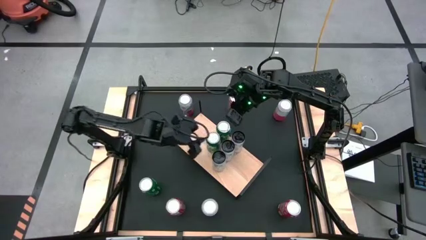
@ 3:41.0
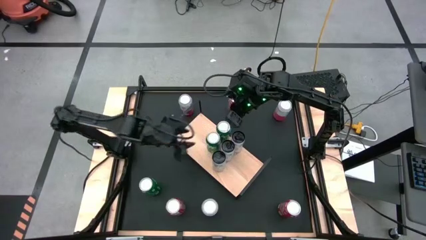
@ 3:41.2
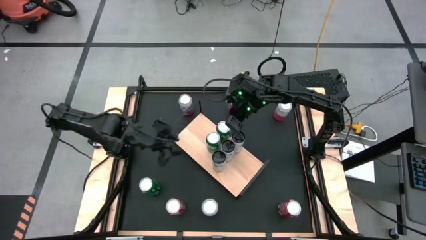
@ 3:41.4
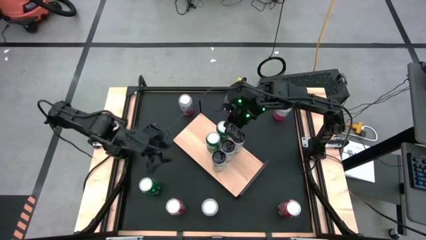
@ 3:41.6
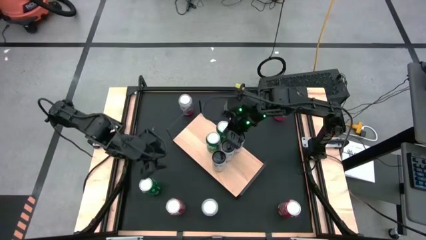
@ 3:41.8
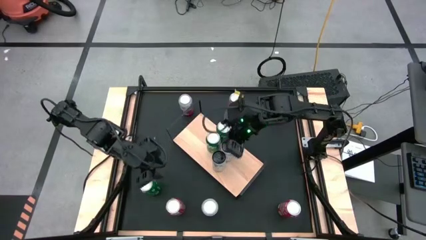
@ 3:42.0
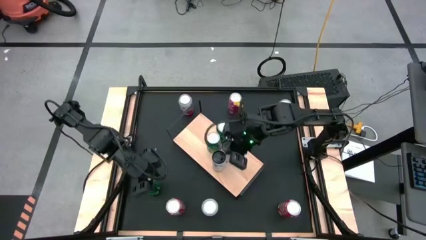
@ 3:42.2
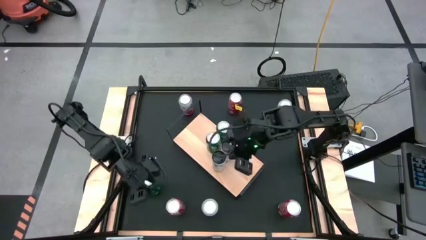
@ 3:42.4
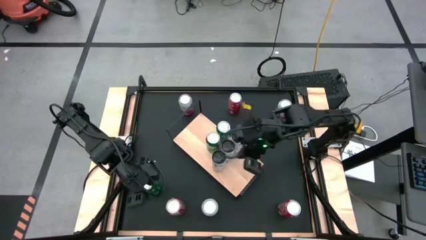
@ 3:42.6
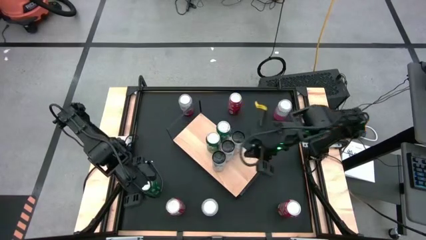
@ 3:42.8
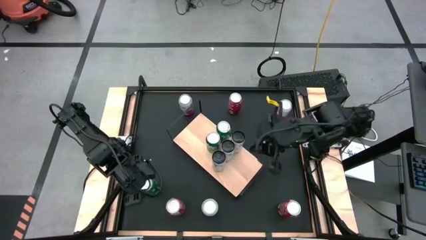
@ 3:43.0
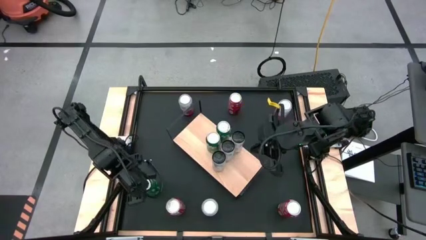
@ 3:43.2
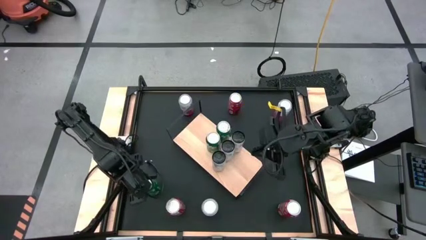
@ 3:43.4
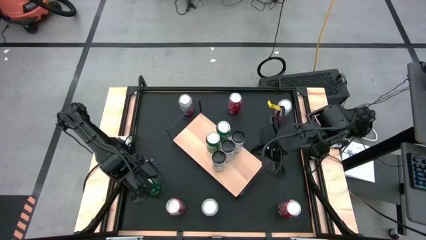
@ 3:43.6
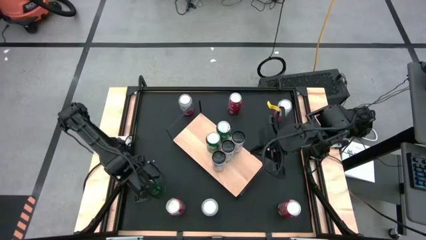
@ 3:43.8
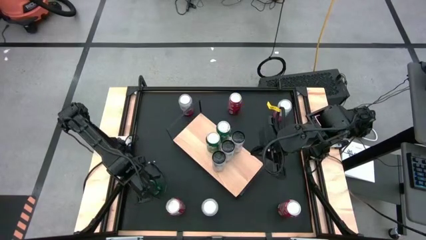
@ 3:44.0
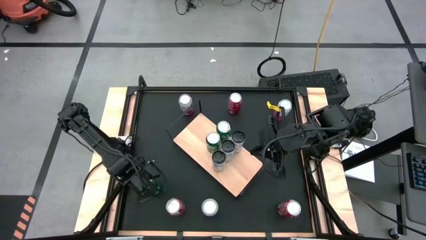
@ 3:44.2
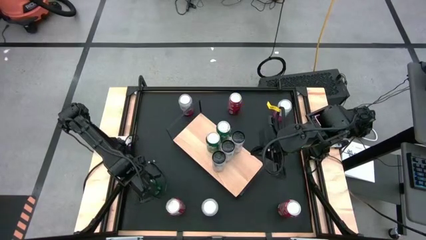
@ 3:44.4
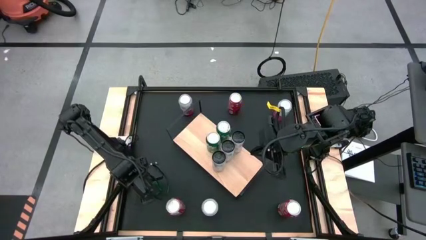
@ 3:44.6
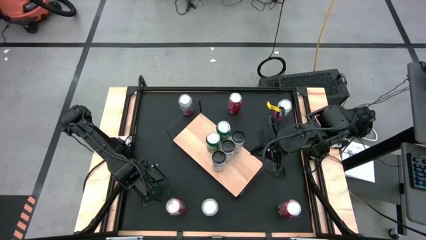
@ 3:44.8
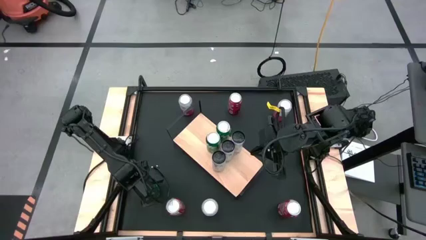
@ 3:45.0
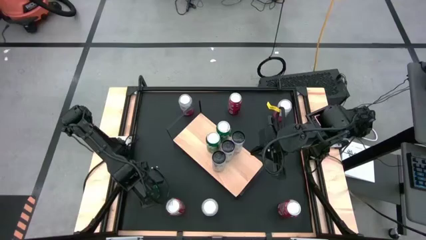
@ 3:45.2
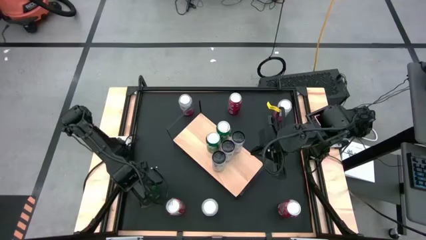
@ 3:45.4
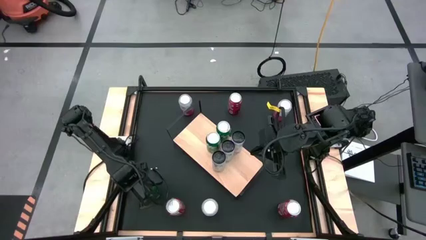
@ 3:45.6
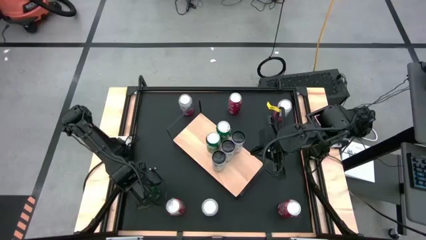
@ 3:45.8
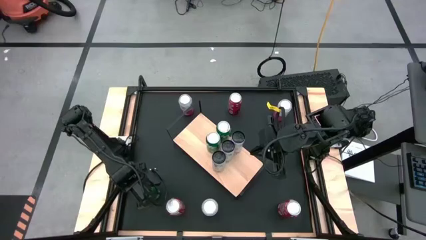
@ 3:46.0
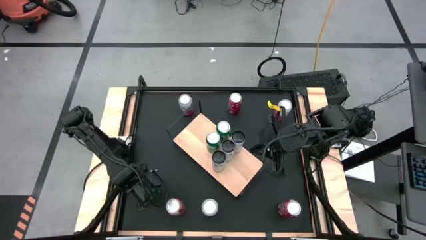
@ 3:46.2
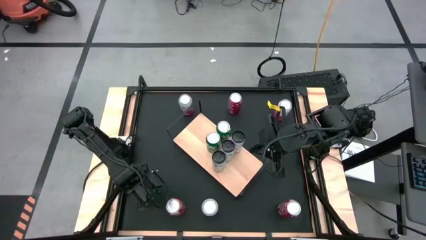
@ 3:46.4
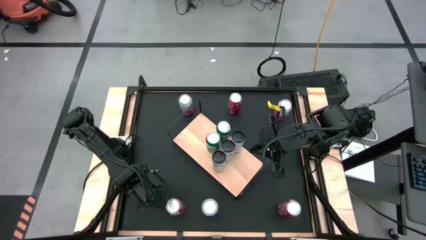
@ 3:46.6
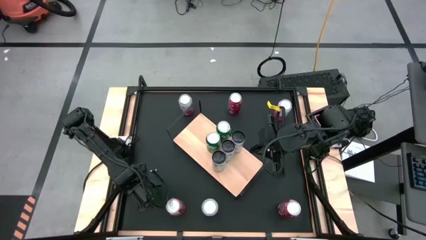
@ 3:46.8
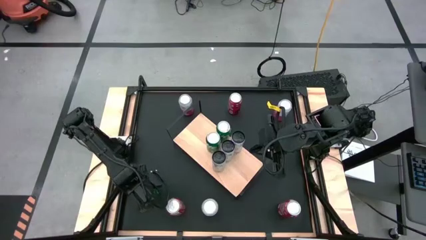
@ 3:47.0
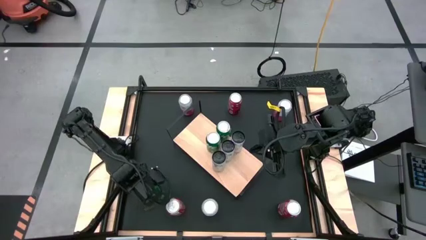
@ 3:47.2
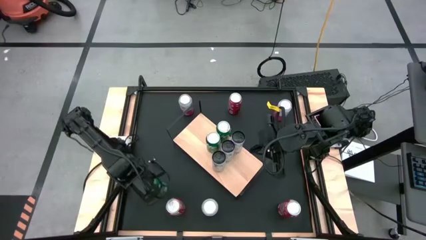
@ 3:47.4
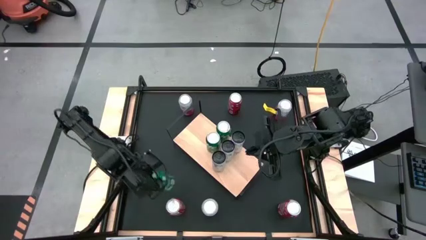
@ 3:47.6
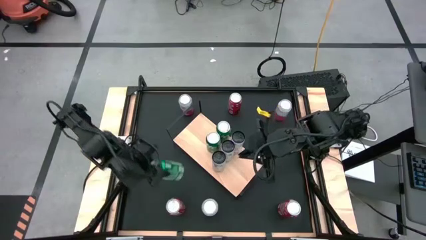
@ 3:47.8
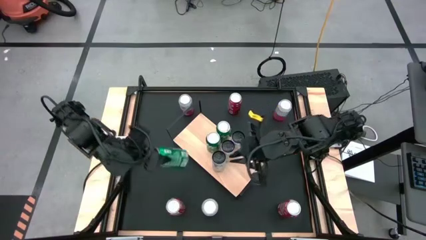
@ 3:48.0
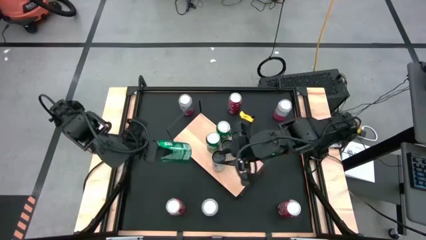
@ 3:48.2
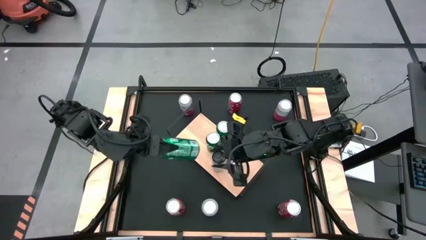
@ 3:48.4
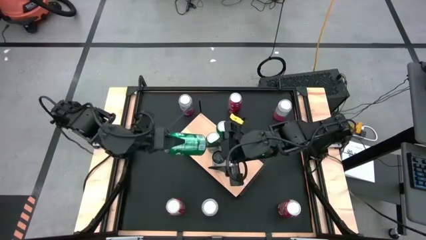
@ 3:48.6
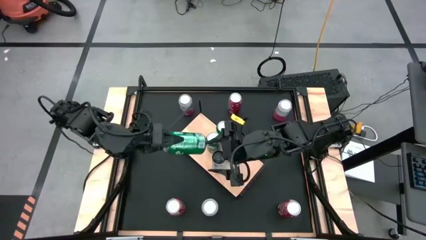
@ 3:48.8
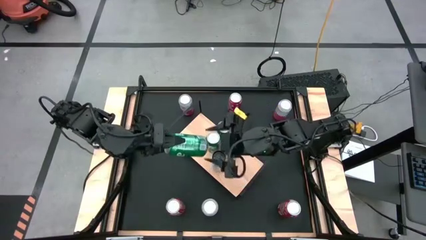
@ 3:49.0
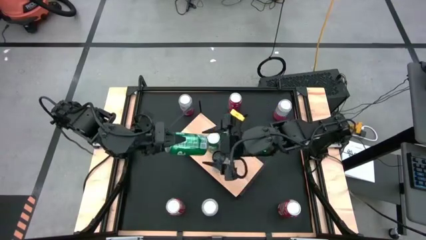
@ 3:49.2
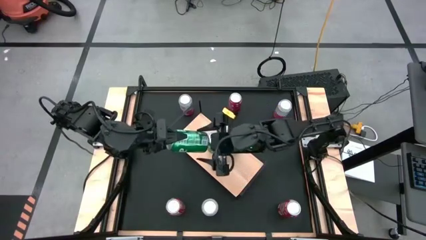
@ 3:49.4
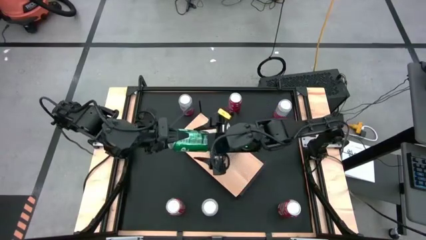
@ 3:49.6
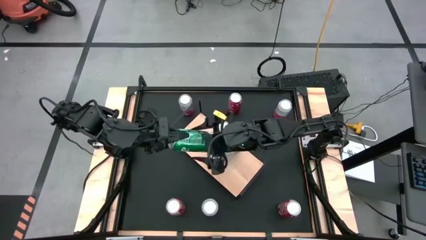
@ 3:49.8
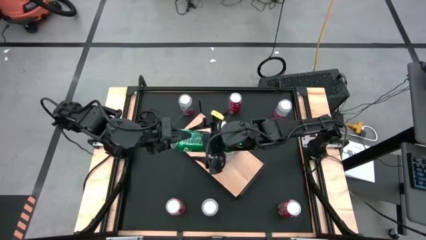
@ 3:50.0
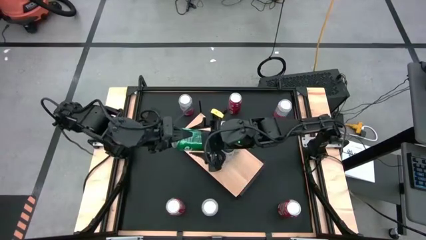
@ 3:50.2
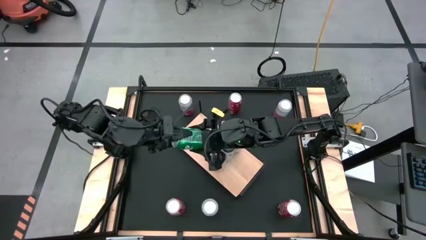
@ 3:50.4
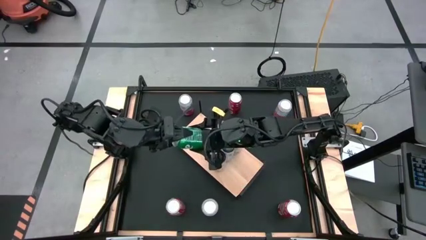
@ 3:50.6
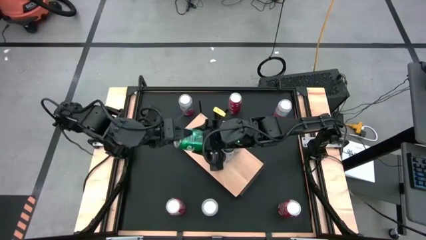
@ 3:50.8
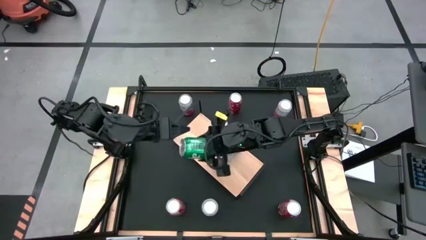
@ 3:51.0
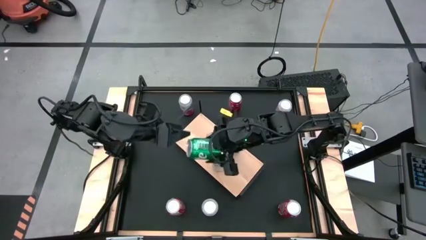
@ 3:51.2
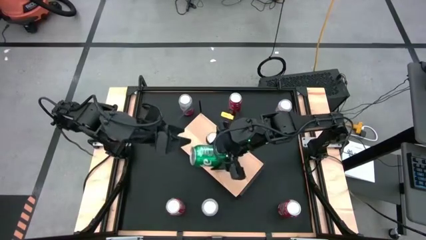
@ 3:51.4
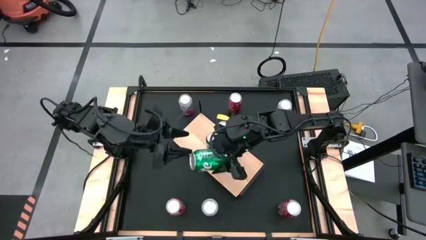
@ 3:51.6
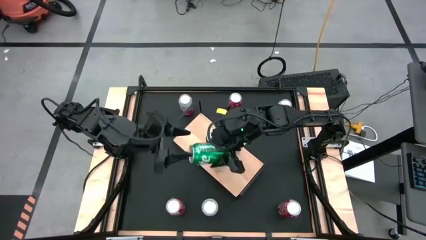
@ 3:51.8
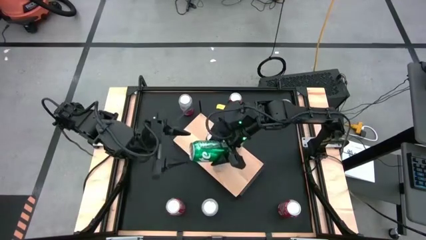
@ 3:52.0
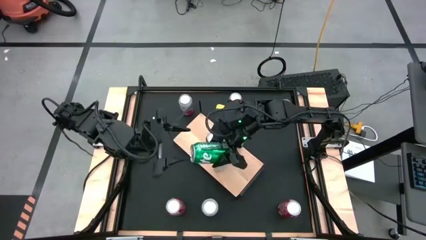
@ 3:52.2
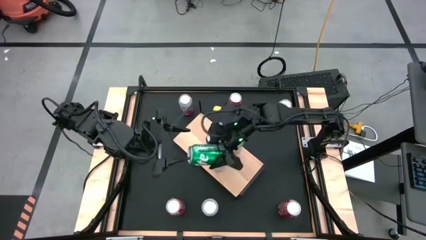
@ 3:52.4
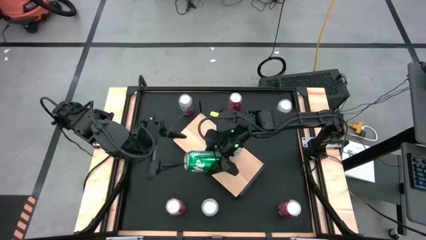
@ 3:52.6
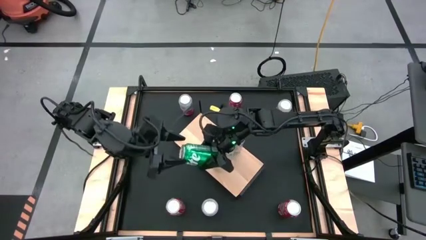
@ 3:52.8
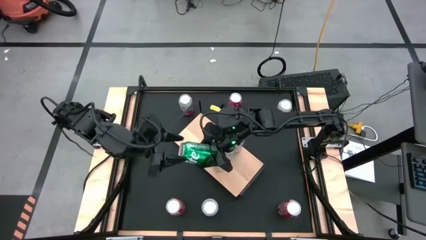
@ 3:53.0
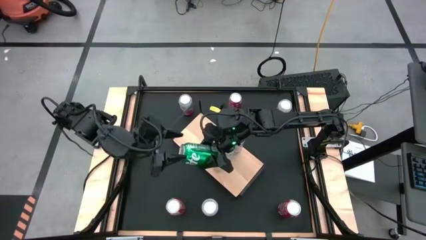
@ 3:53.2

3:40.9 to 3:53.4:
Task: Place canned beverage on shelf
Put the green soda can aligned with the other green soda cans

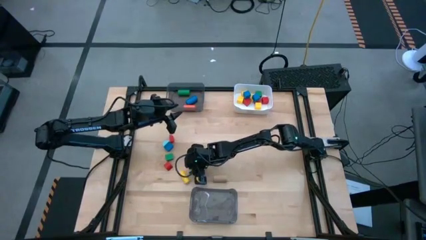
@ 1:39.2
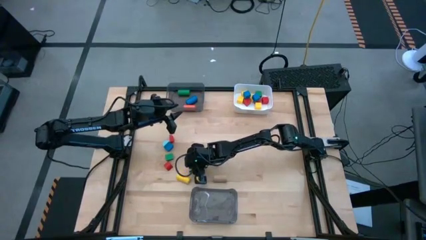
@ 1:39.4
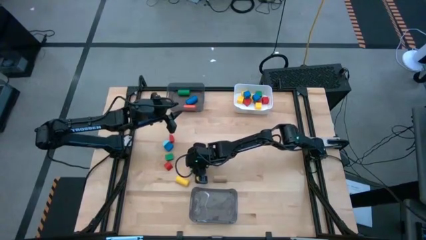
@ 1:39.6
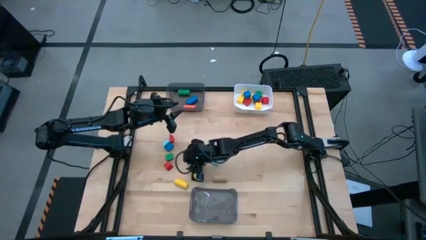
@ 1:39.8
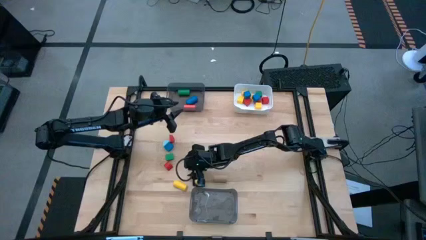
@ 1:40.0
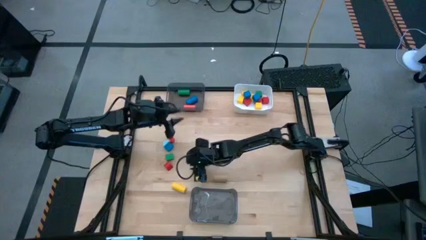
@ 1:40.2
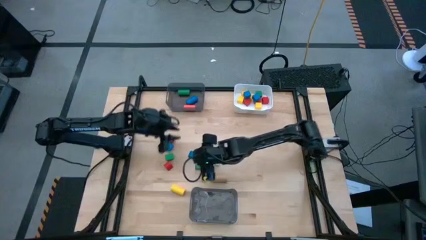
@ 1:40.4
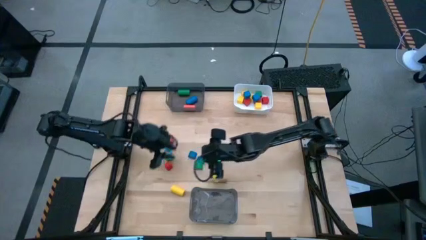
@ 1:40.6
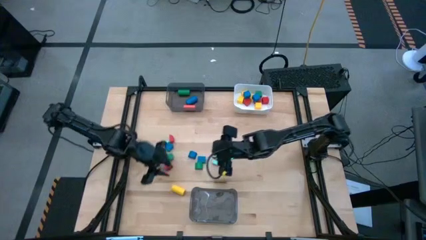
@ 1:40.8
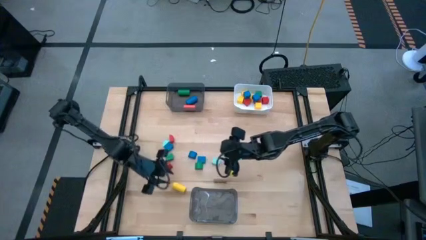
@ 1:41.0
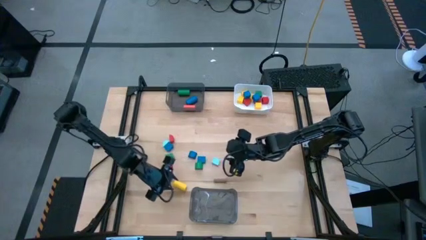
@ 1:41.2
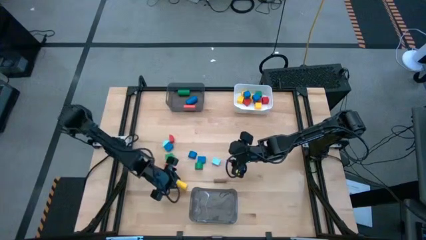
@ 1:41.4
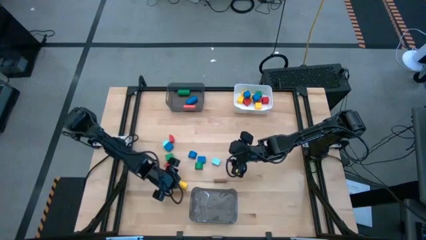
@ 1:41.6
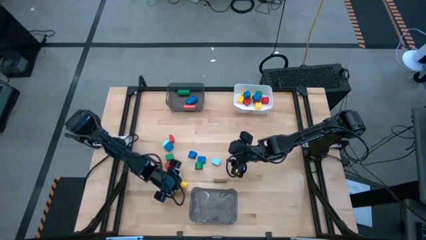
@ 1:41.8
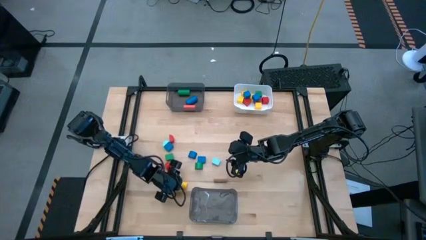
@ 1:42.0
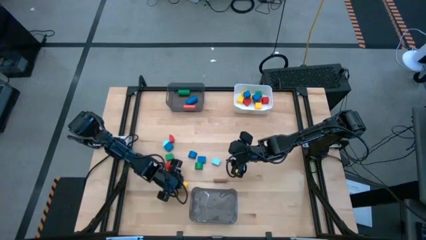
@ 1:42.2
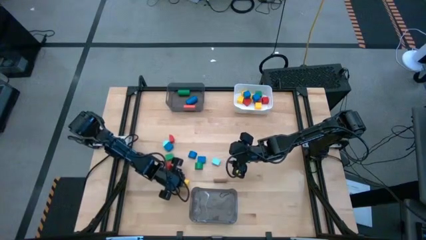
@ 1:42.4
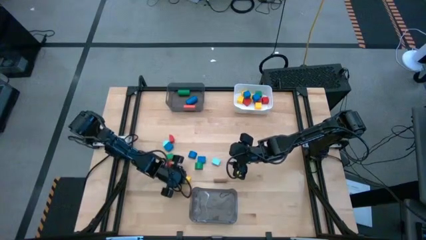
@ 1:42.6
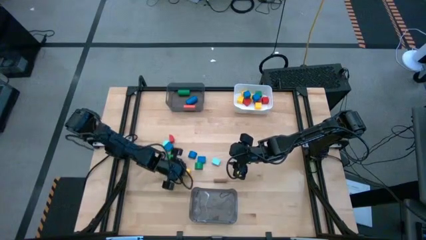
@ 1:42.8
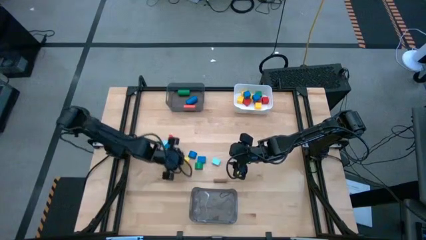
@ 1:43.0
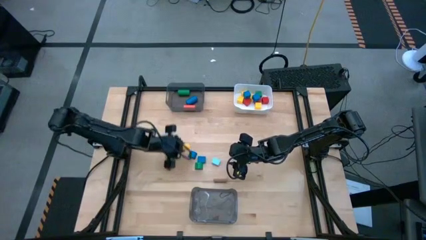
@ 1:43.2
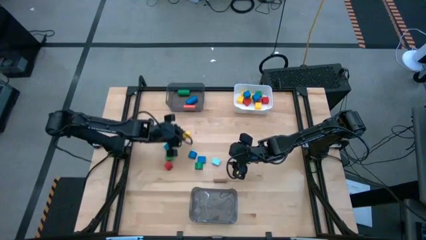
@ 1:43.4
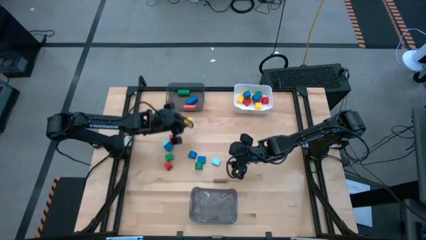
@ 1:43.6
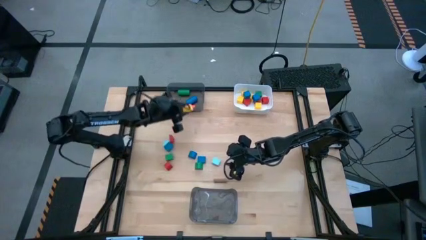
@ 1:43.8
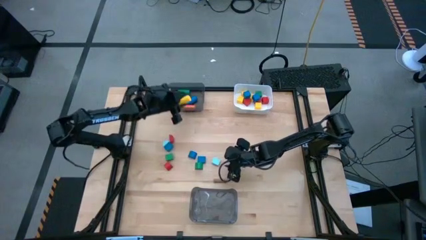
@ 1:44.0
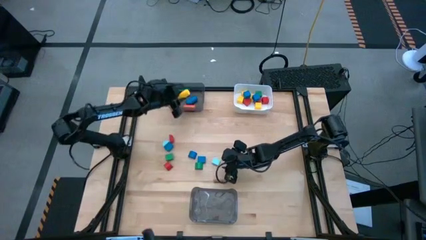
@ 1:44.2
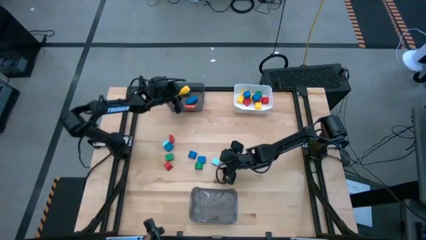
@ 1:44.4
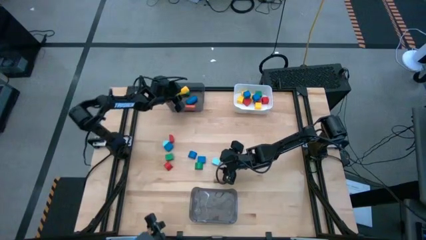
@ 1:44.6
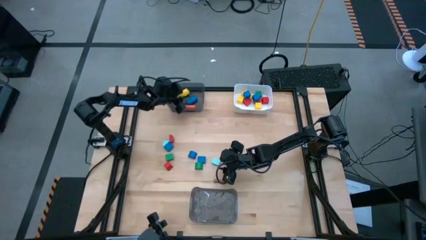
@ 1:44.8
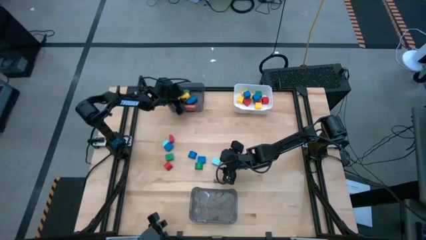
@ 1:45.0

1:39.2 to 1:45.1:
Task: Sort blocks by size
Put the yellow cylinder block into the top black bin
